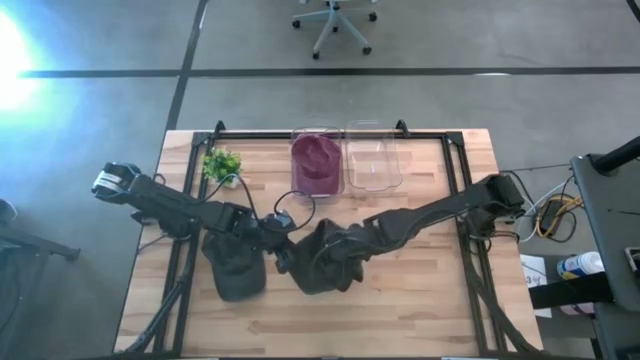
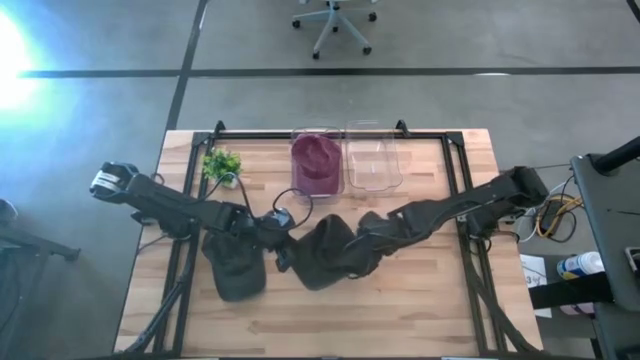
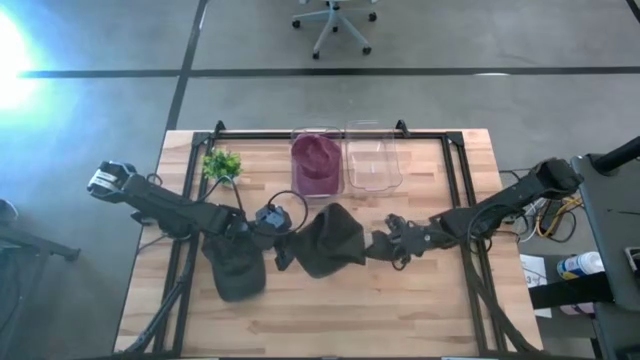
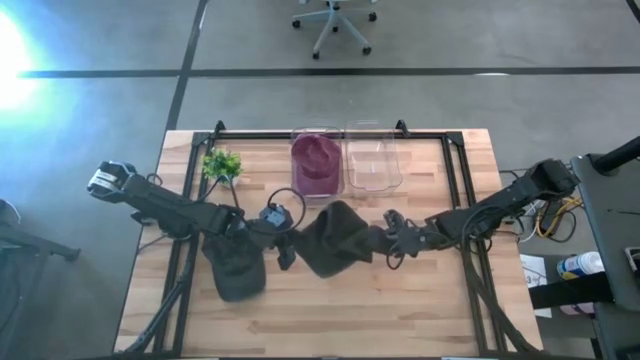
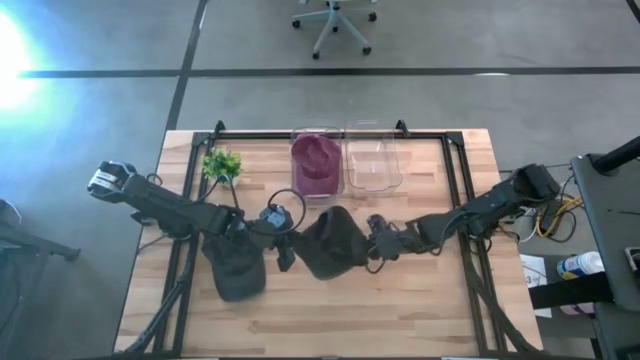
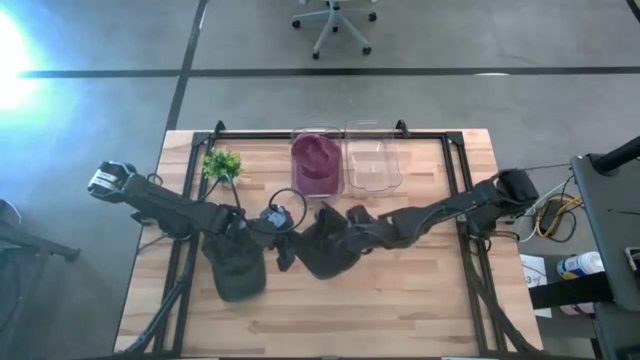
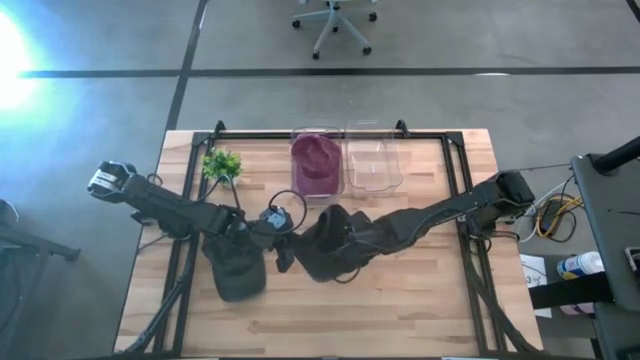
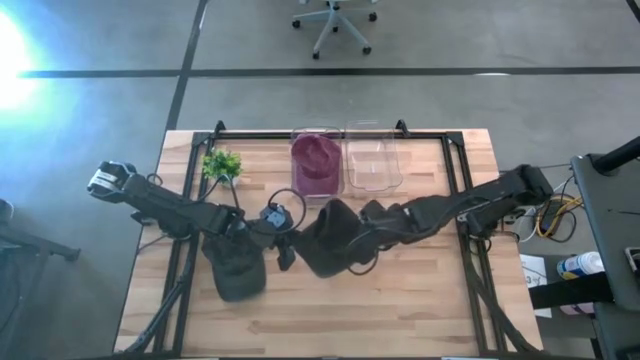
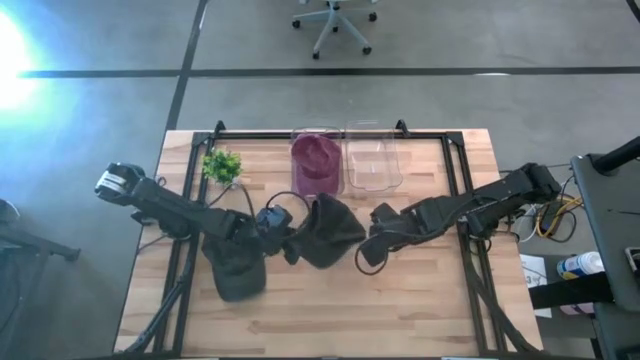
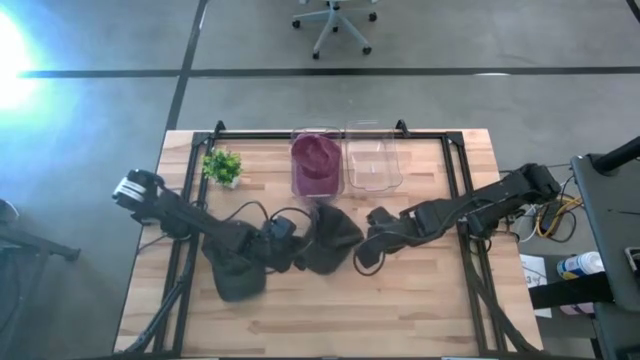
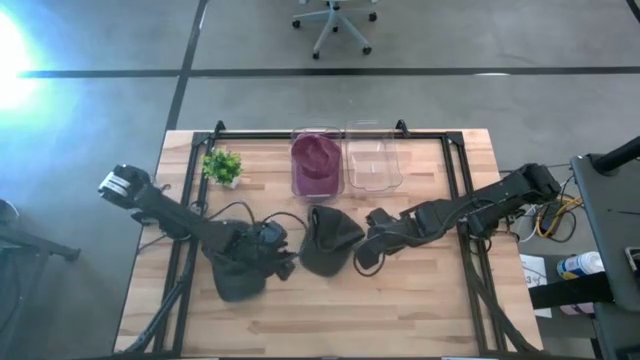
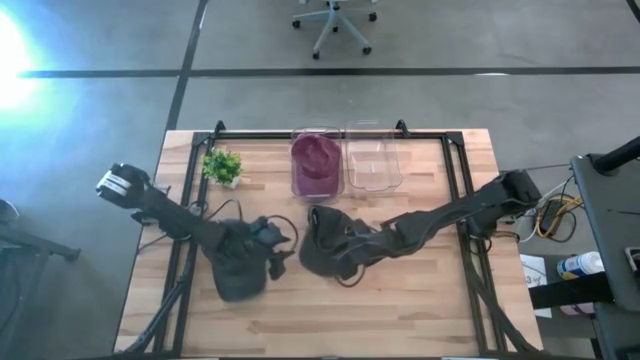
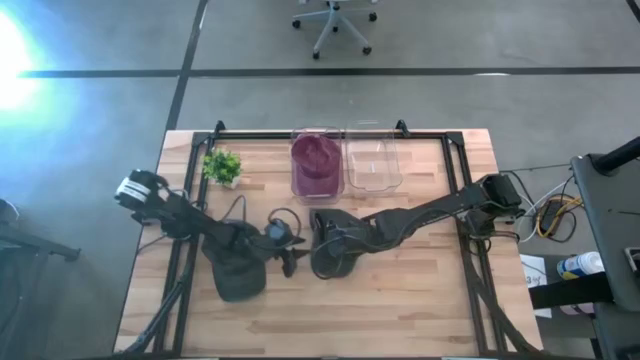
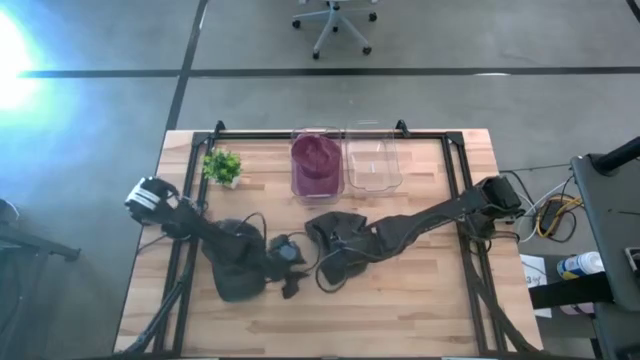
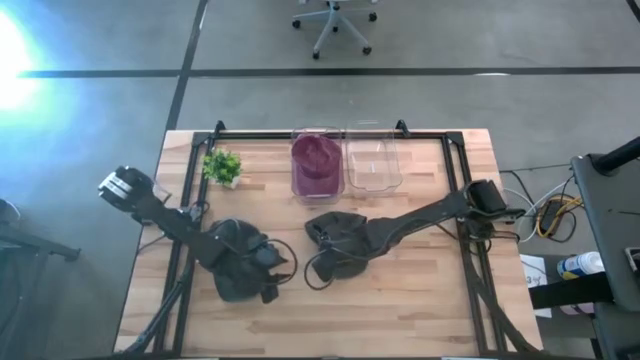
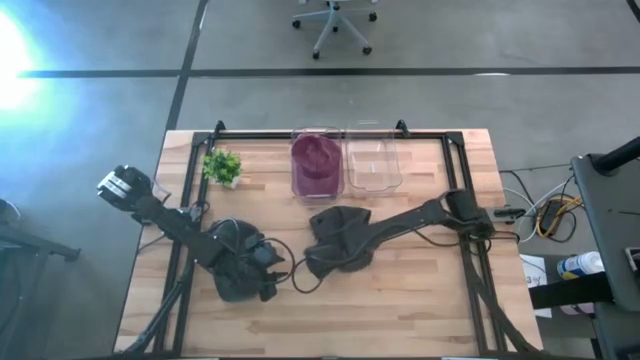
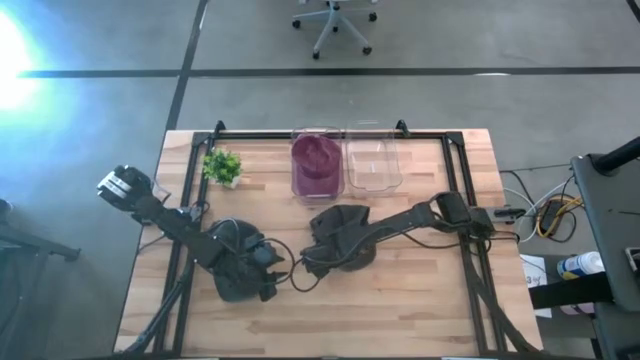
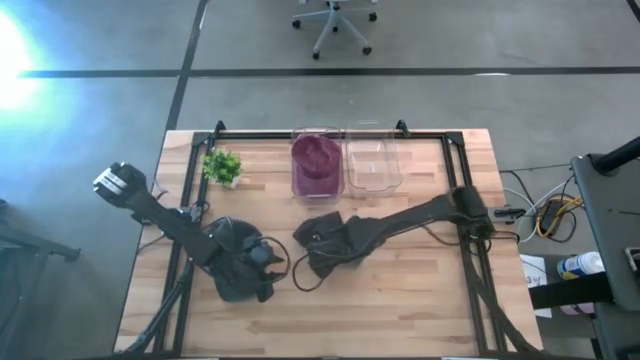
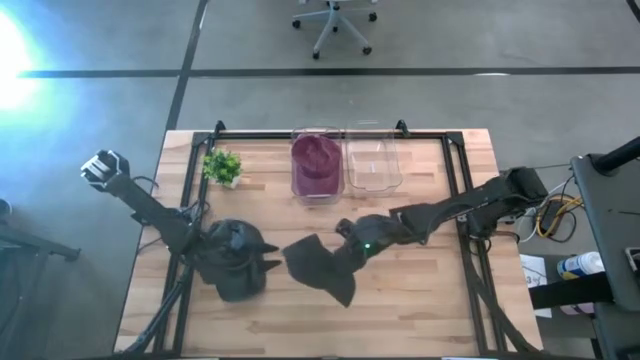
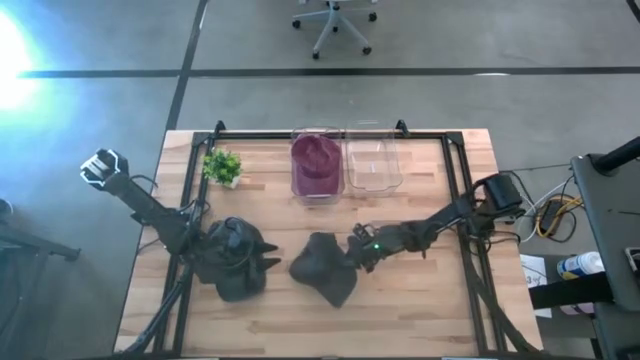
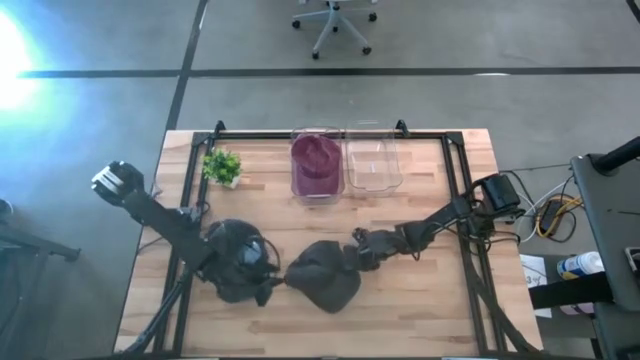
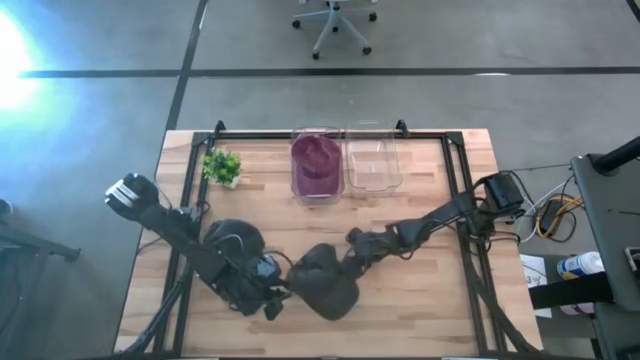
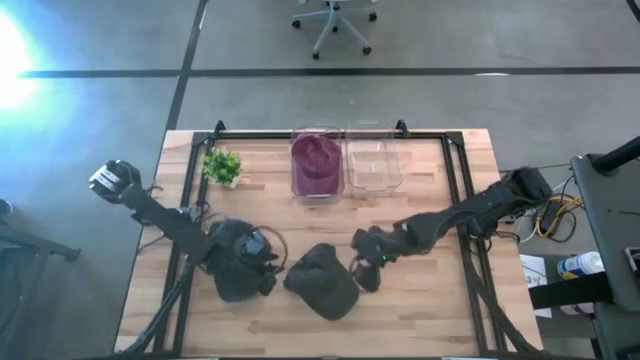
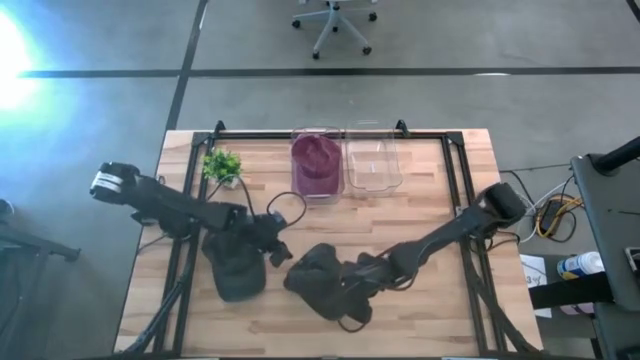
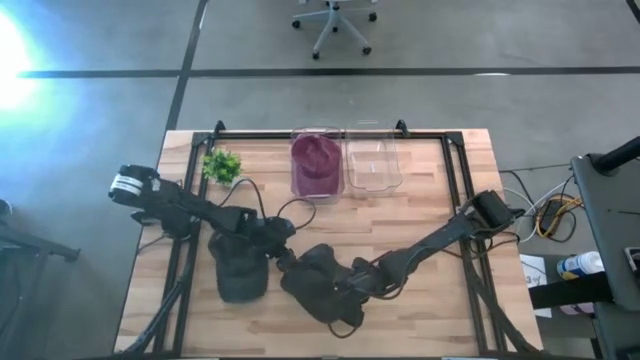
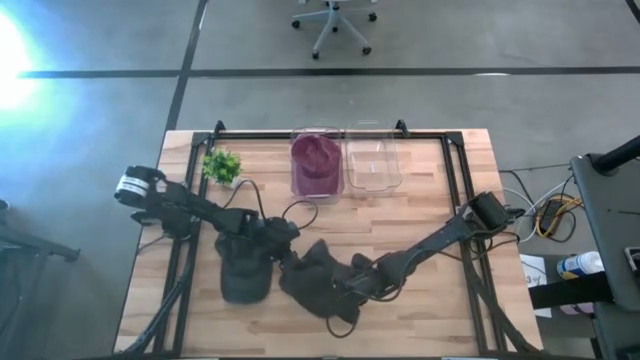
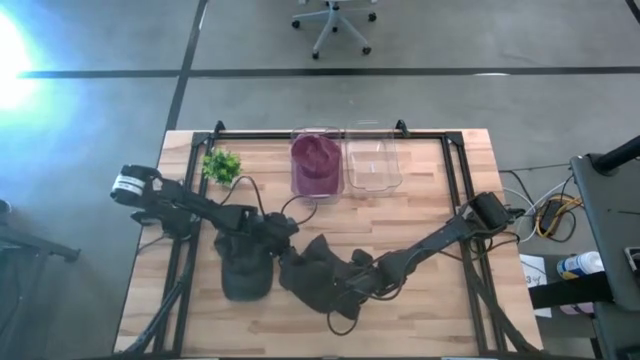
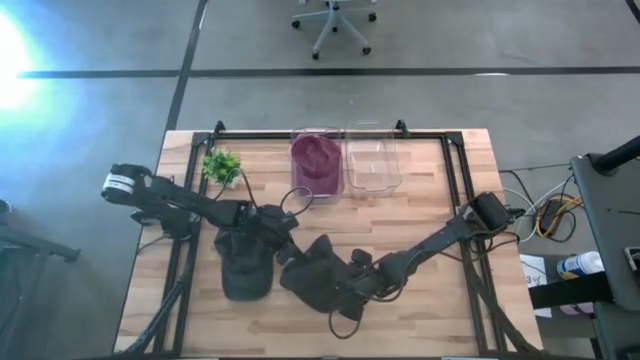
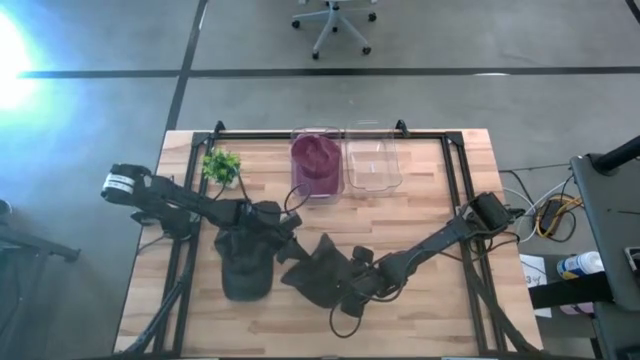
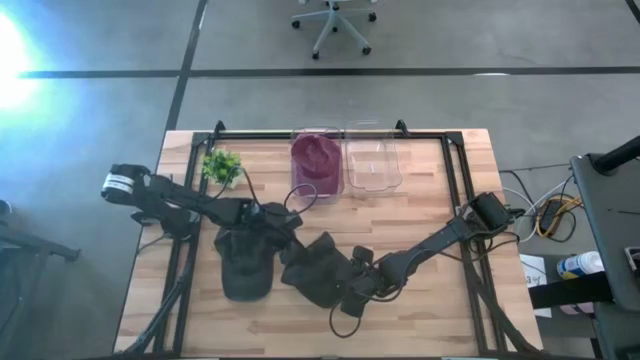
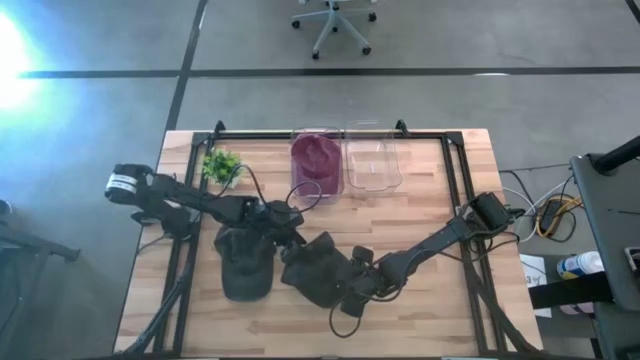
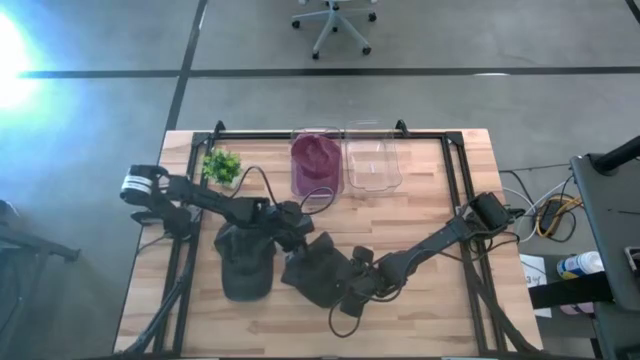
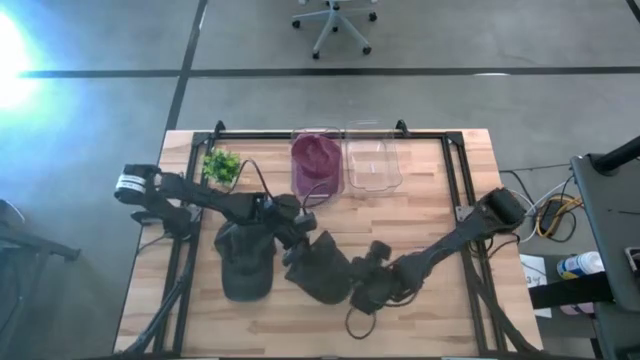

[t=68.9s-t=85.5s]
Task: Pick & Place hat
Put the right black cap into the right transparent bin

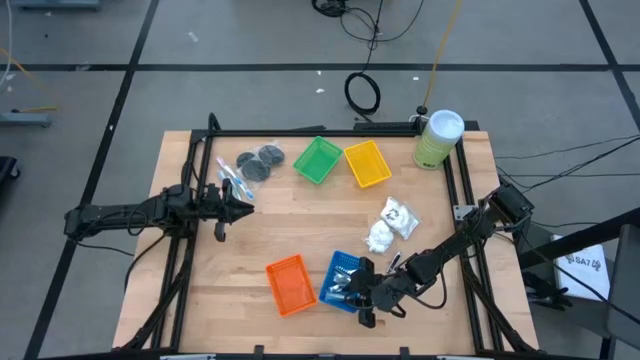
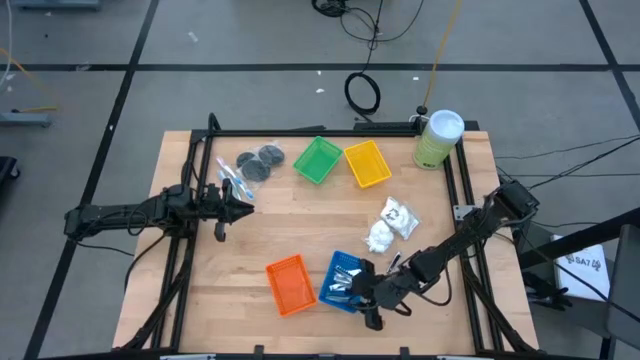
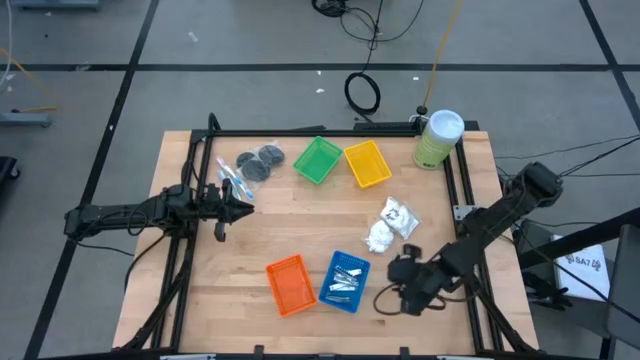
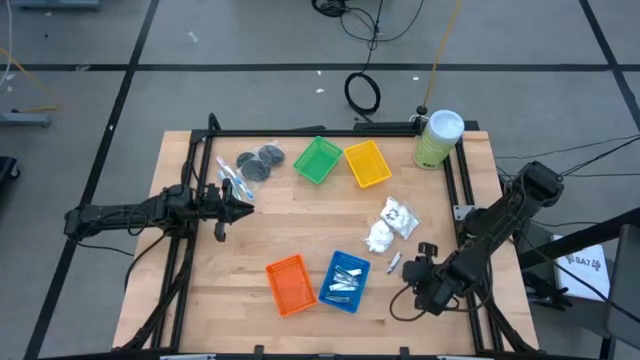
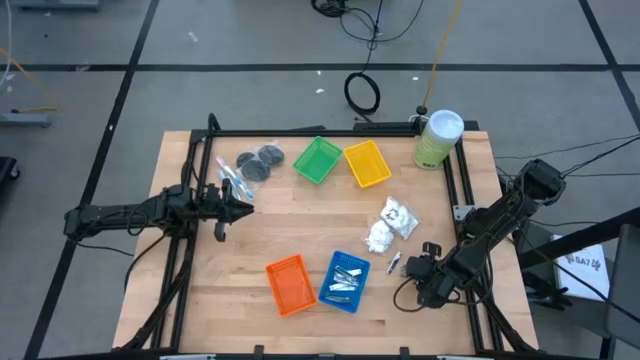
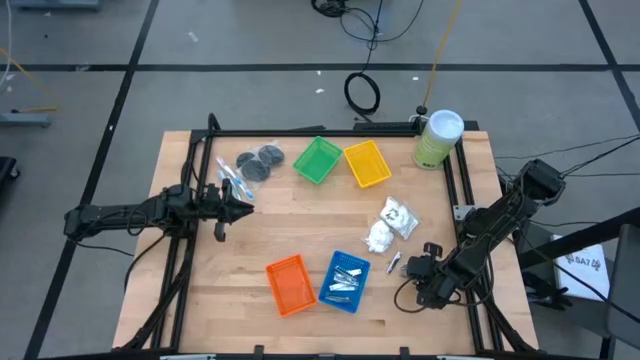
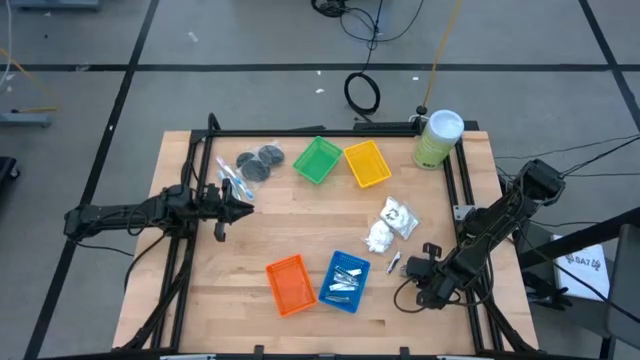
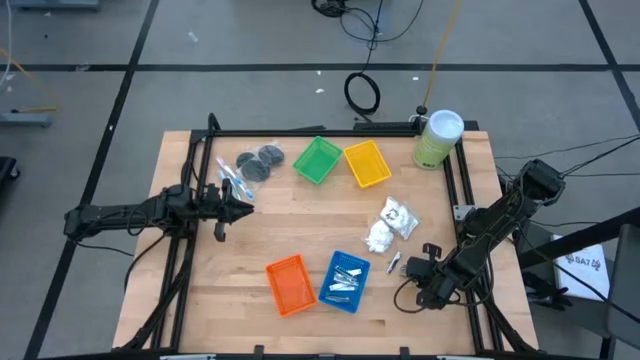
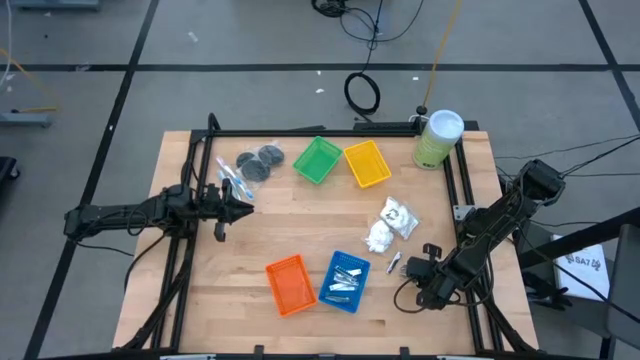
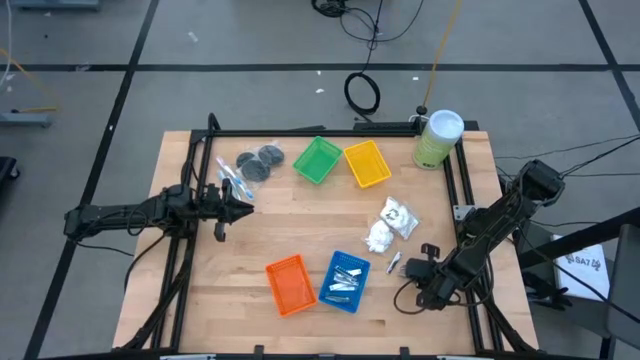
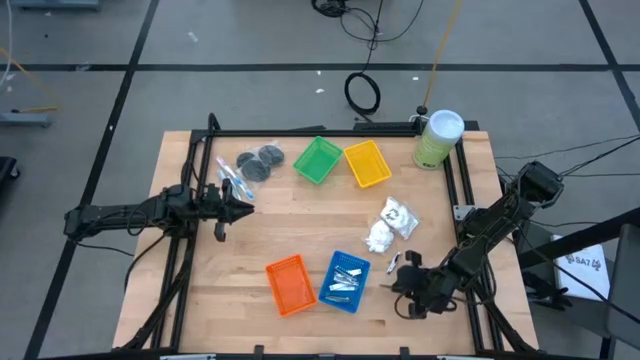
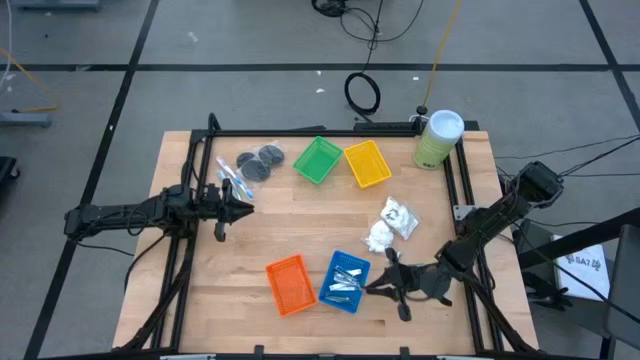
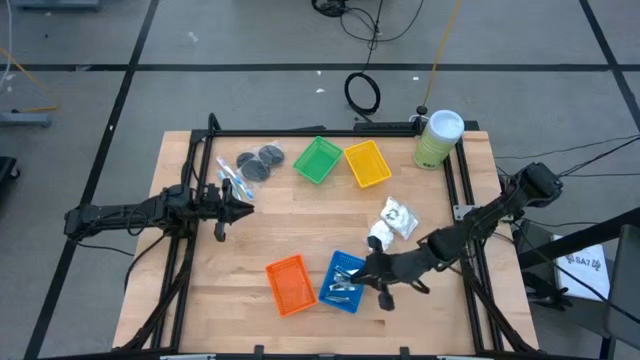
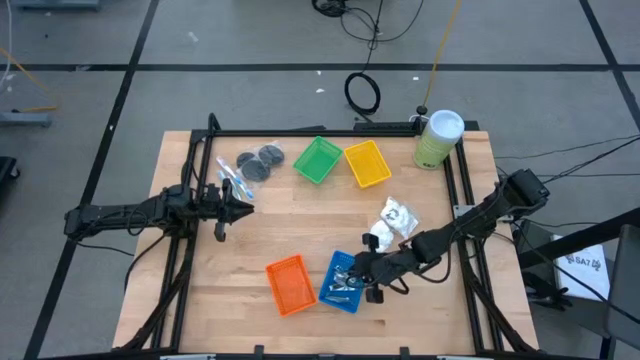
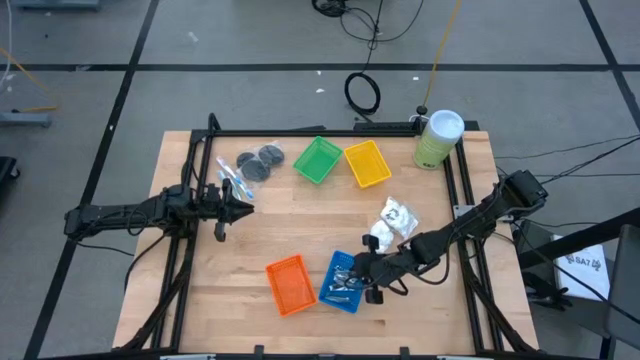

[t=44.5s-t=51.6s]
Task: Pick & Place Travel size toiletries
Put the silver nail cutter into the blue bin
